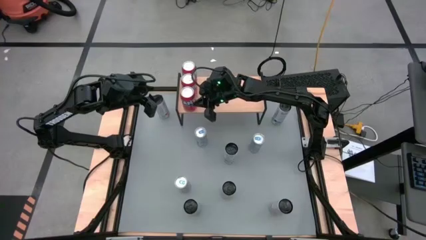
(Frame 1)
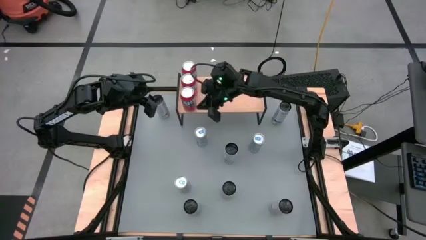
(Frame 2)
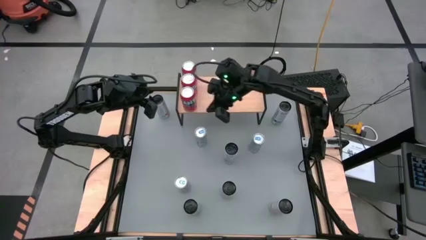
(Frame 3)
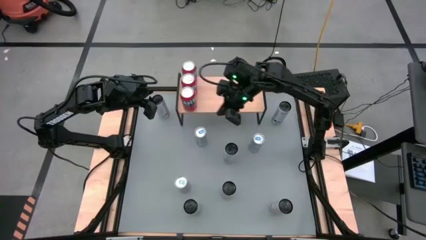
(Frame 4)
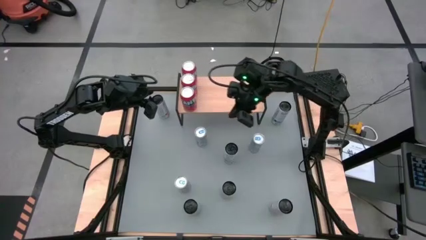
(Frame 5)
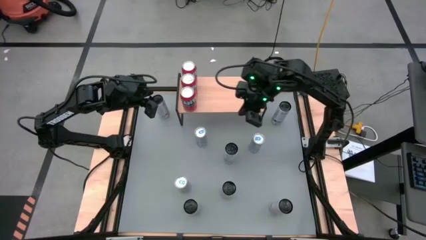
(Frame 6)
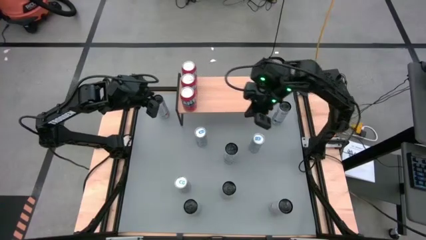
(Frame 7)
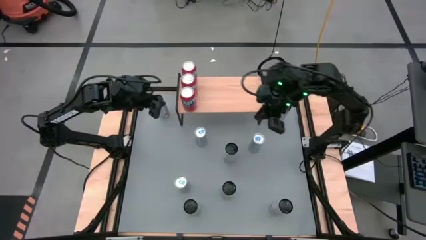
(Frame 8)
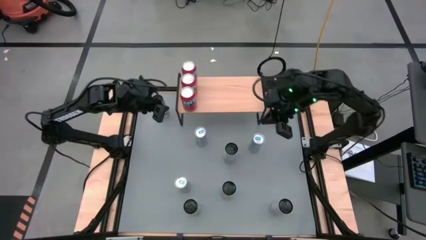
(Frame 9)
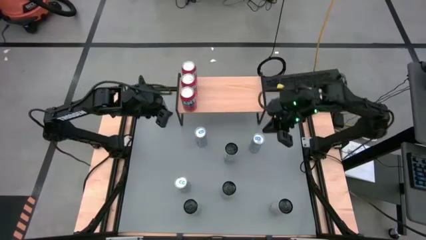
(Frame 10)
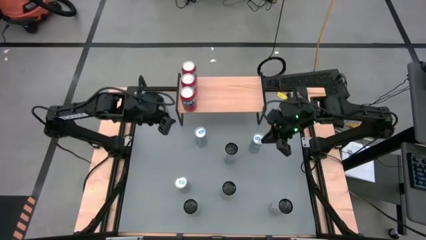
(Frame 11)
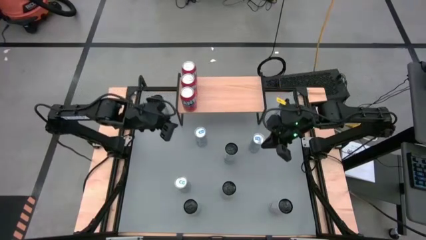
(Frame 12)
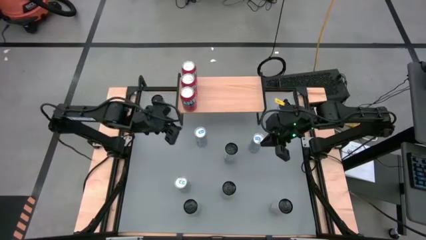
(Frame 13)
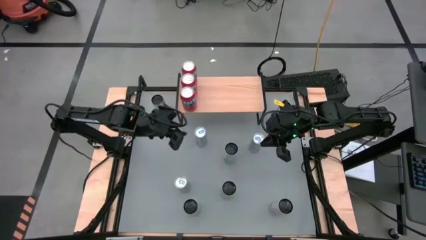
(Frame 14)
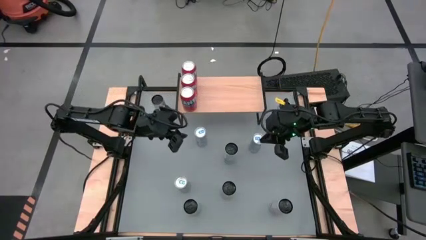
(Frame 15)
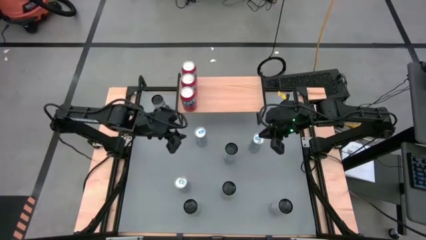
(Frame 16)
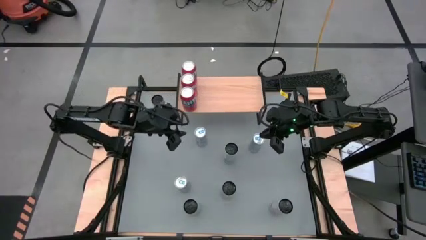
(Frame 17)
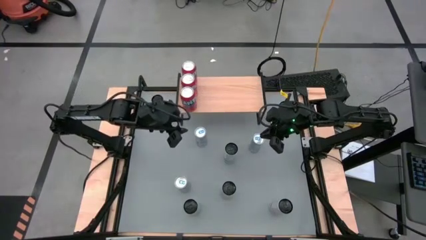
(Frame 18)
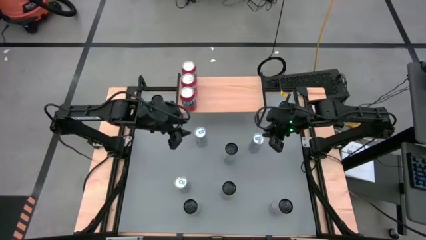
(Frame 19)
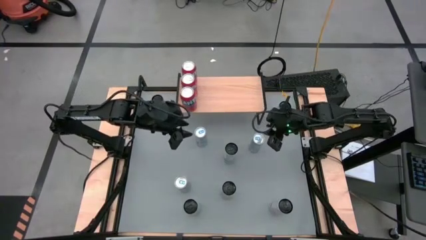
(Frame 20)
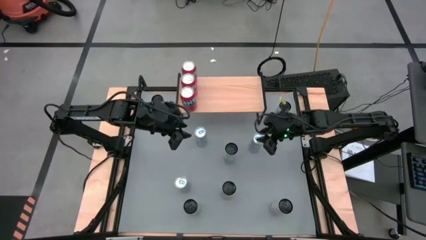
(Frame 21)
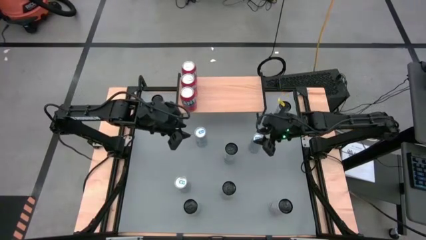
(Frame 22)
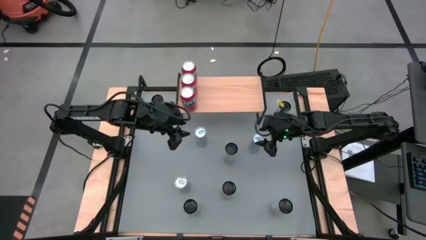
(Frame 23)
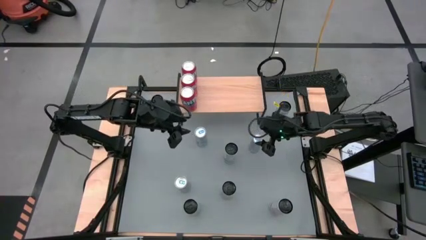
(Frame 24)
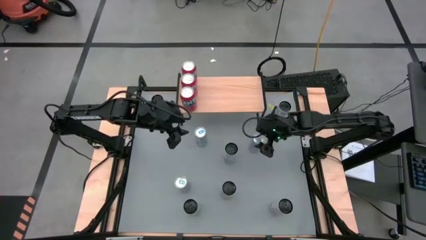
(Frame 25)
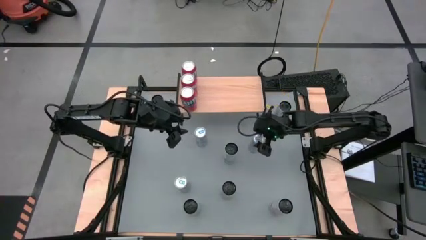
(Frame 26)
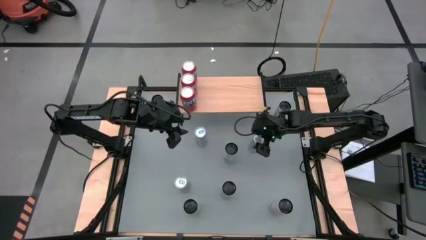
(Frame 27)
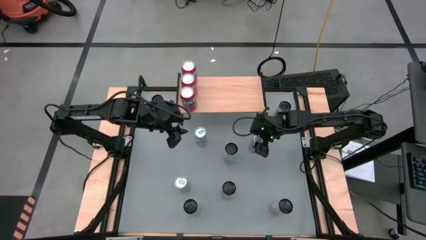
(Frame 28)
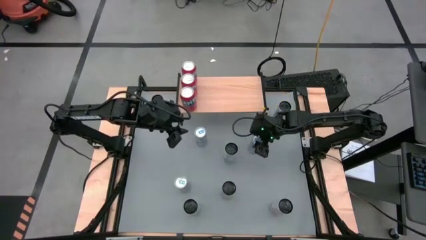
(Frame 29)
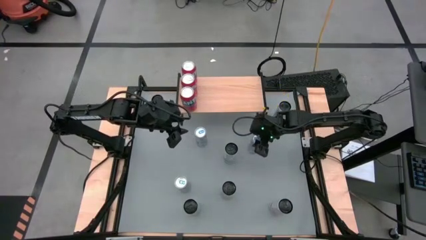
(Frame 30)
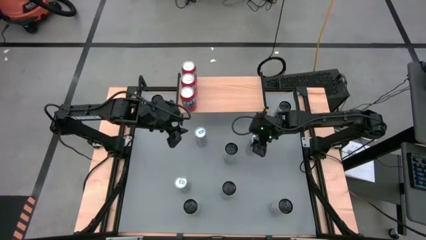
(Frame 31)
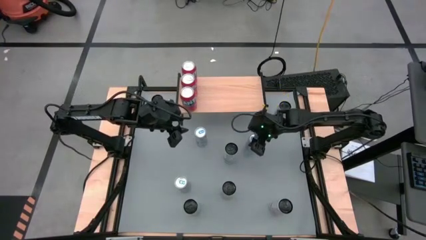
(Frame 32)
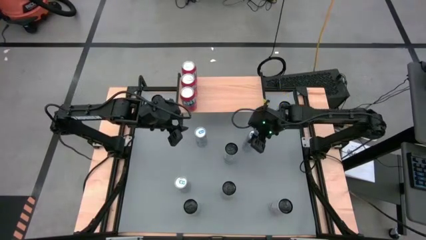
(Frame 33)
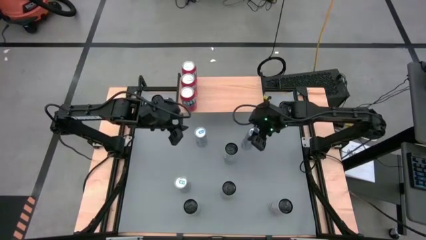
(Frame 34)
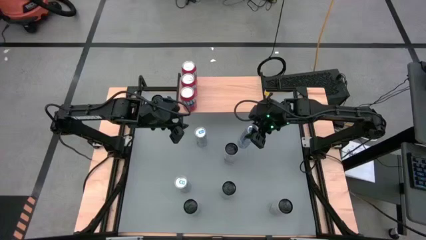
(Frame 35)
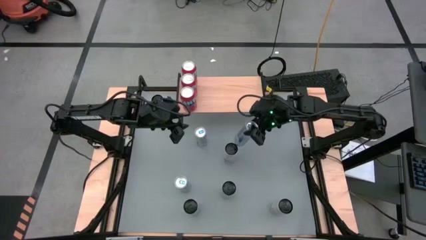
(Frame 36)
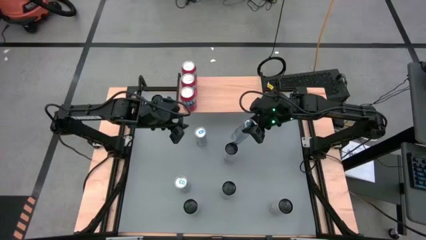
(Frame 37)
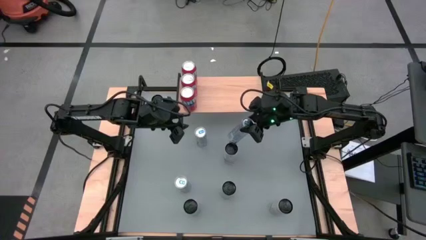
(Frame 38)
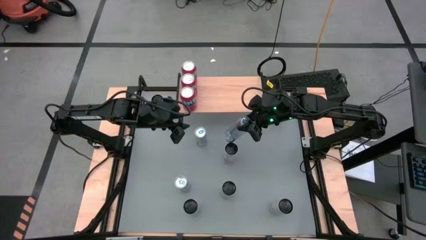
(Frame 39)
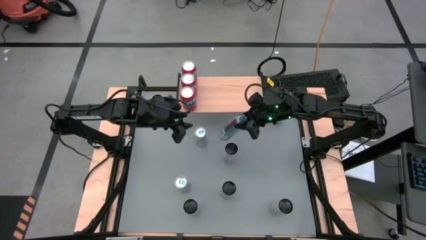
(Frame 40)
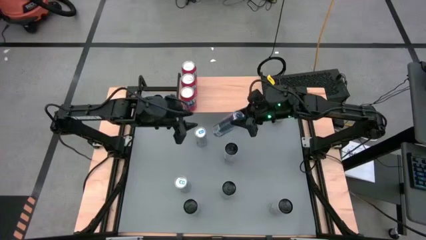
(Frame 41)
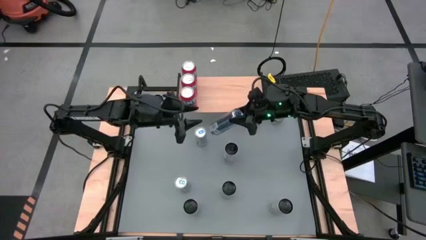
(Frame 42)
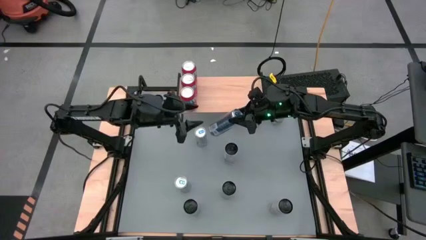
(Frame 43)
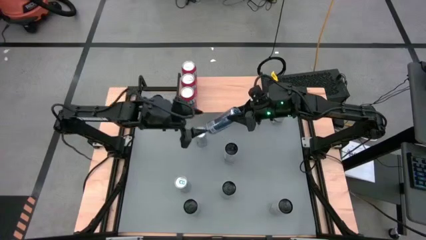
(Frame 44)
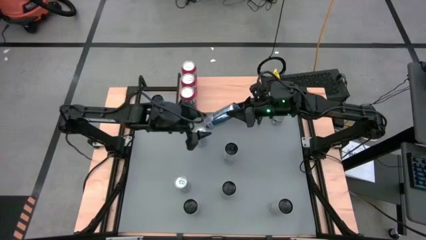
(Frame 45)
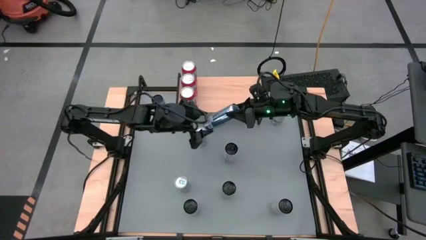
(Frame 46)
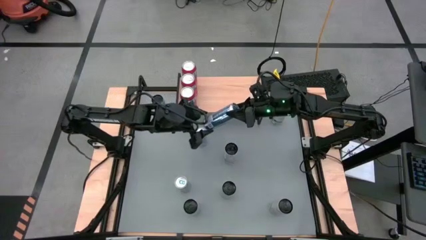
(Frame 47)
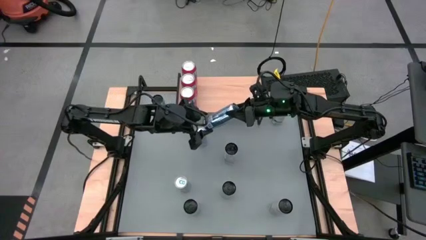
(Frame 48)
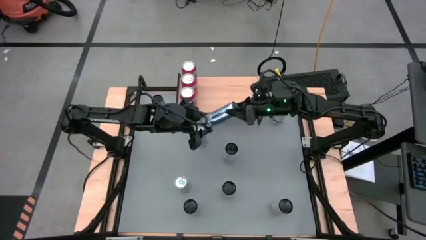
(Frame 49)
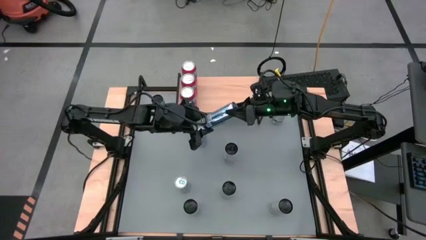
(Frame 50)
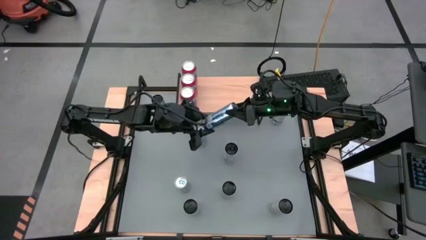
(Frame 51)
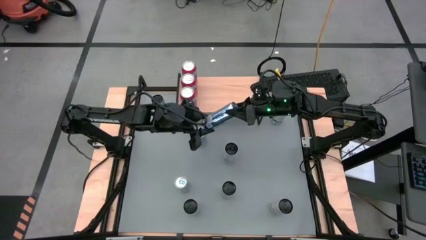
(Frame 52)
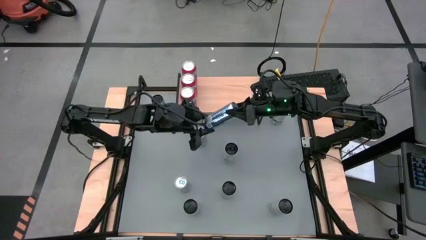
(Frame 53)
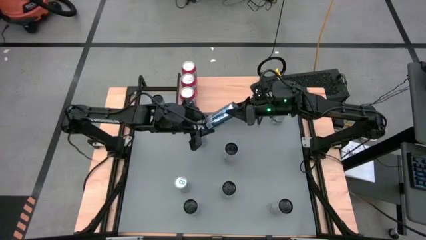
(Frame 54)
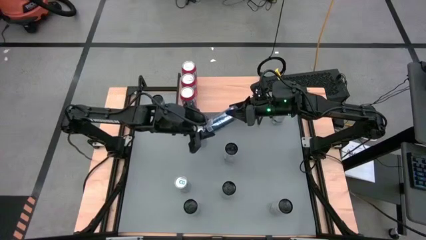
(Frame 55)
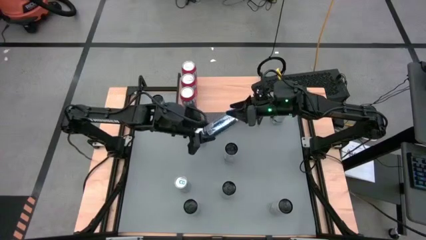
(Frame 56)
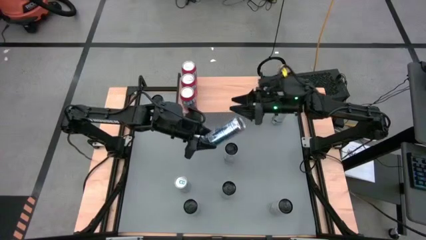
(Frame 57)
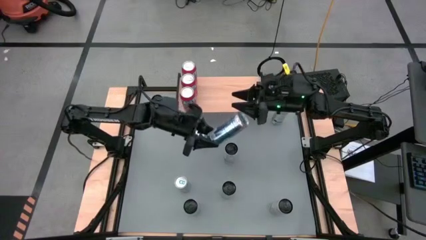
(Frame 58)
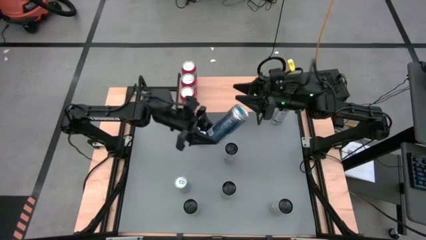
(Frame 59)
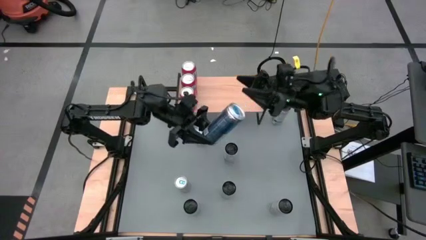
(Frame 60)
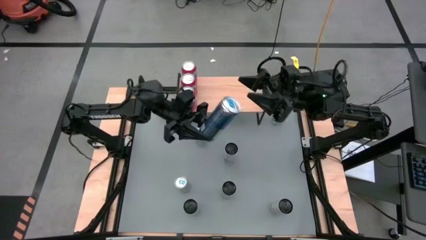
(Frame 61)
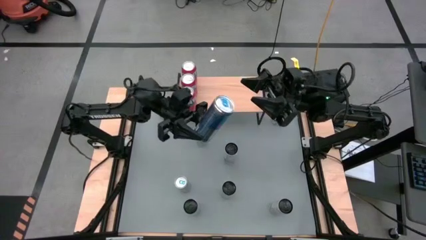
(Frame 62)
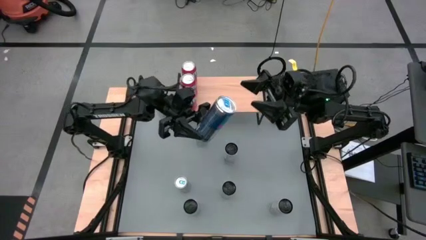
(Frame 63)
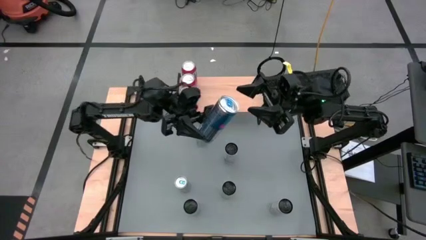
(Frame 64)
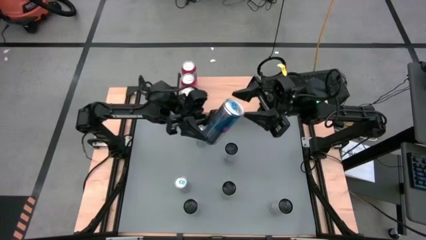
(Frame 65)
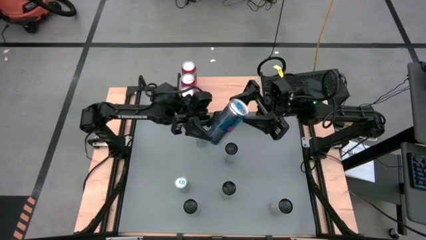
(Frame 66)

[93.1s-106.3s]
Task: Place canned beverage on shelf
Put the top right blue soda can on the shelf

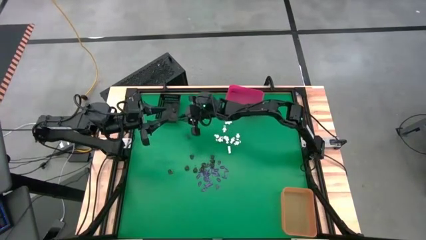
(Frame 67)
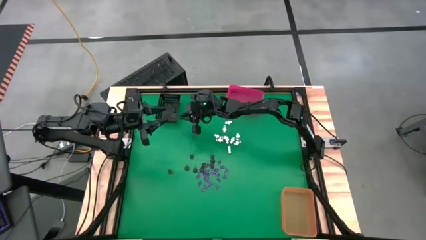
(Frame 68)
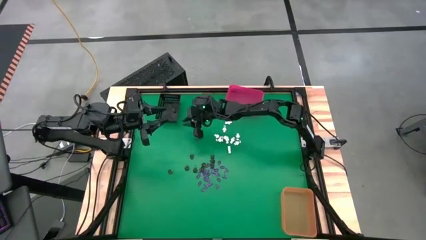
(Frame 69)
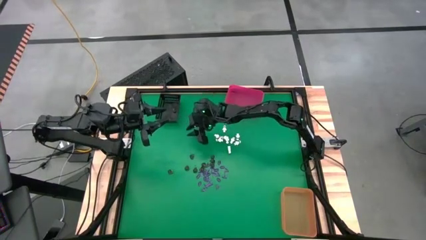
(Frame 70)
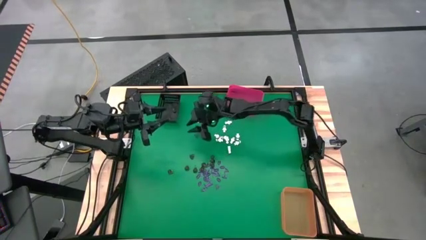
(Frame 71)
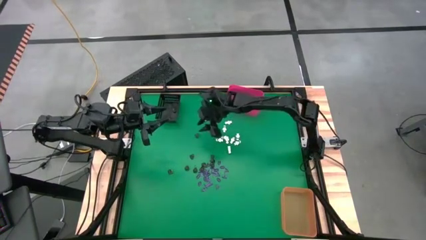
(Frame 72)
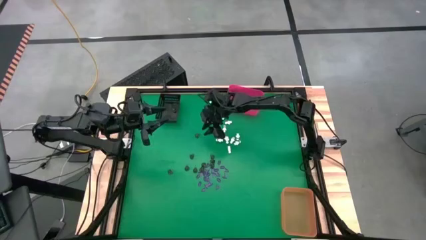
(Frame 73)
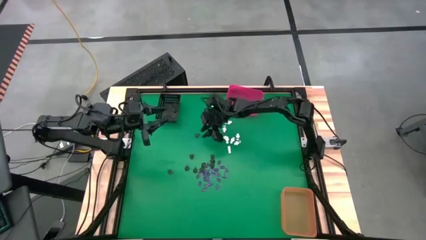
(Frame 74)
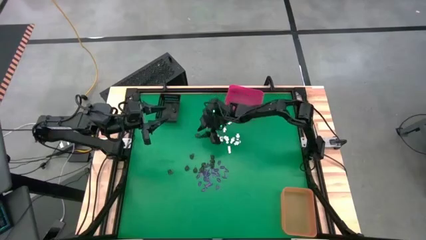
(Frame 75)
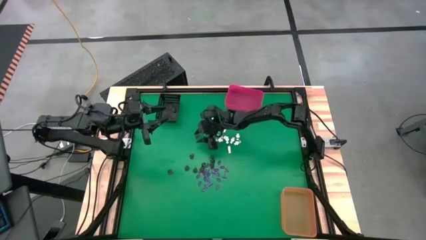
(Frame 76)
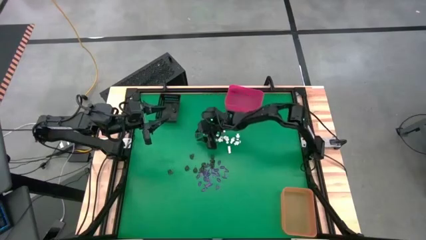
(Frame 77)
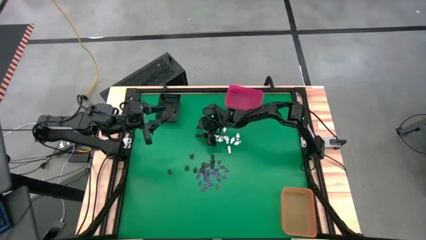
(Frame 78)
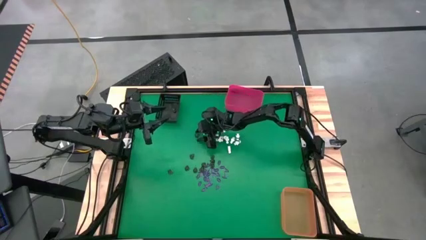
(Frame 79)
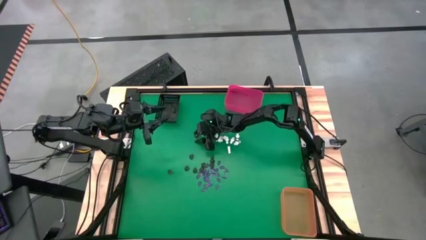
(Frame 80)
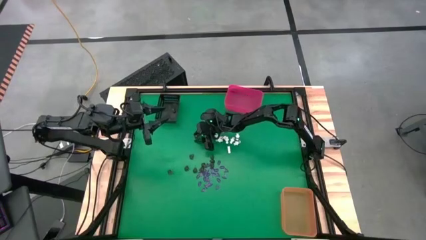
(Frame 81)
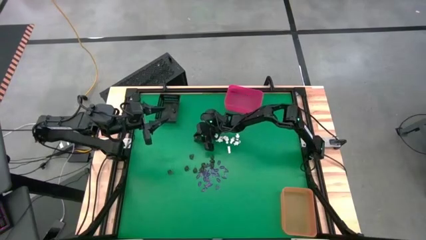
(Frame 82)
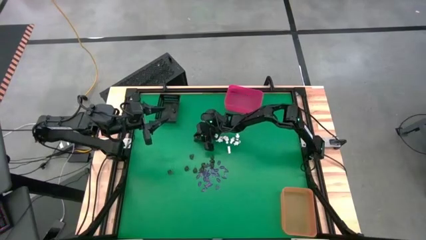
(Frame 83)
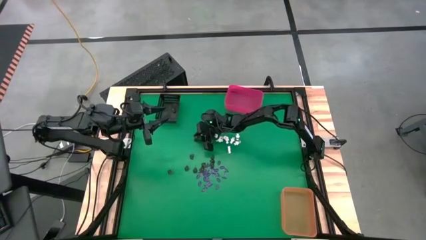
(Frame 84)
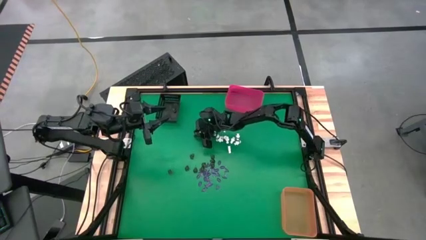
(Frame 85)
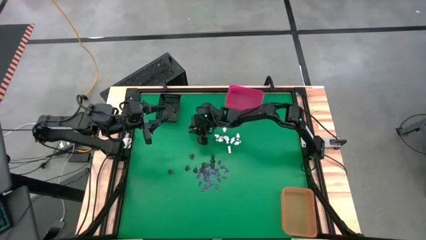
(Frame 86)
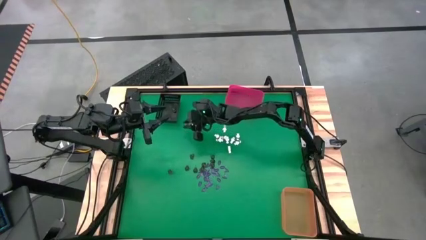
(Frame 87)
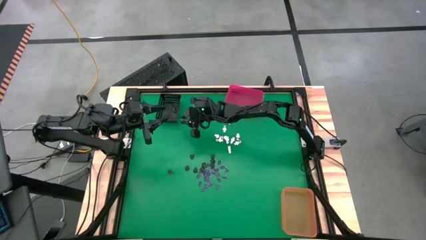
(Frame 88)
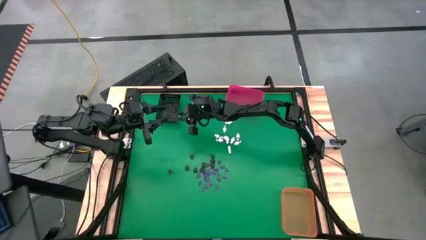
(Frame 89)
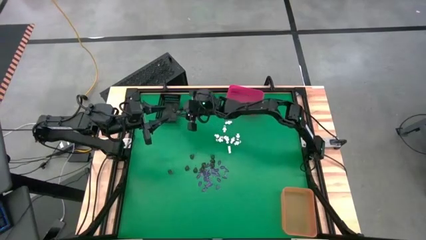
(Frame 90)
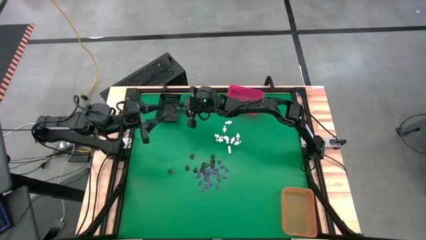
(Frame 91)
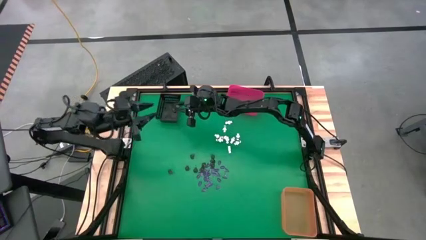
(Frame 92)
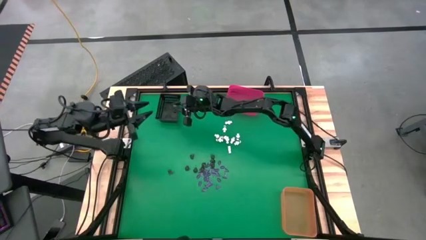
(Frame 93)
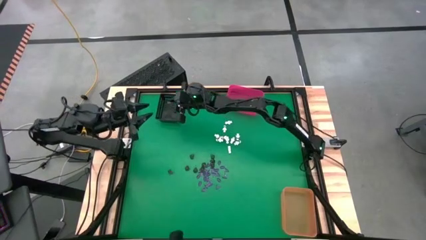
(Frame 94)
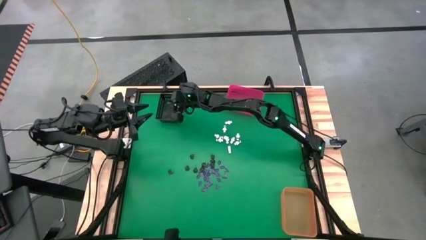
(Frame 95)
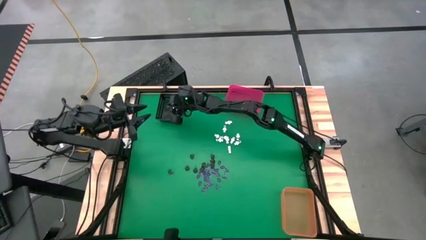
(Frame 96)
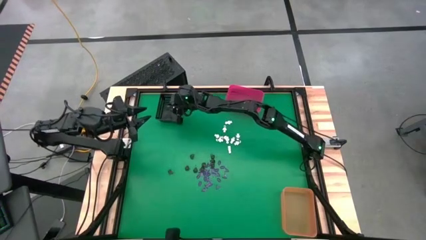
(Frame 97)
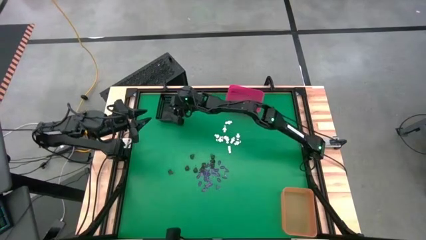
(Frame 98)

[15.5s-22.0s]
Task: Sort Halloween decoration
Put the brown skull toy into the black bin
